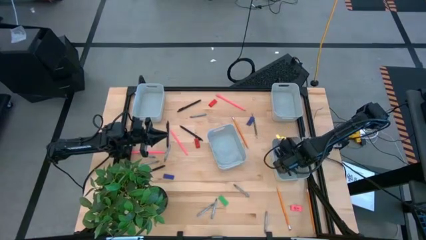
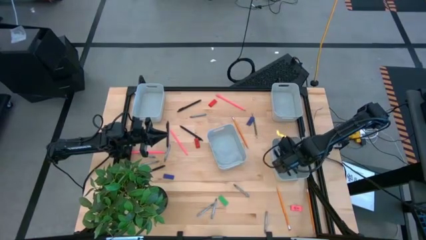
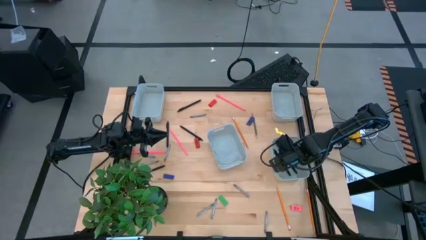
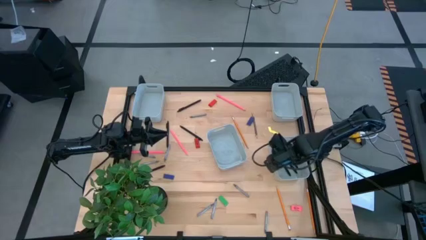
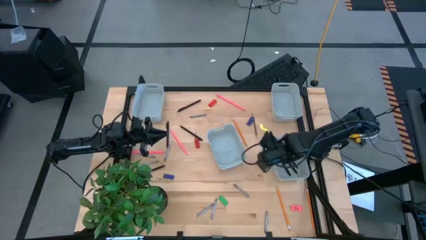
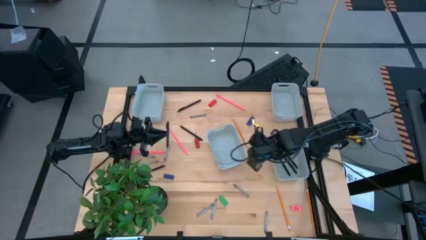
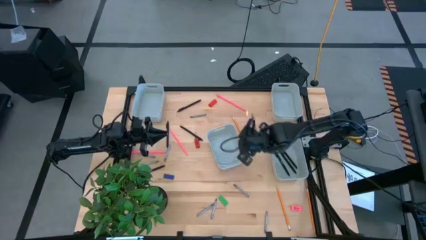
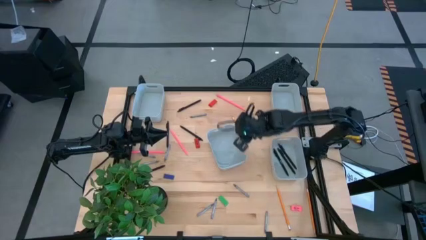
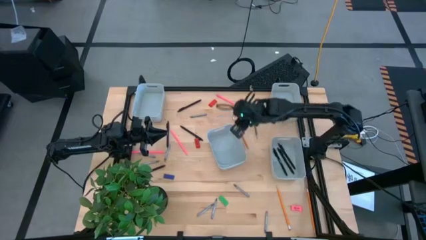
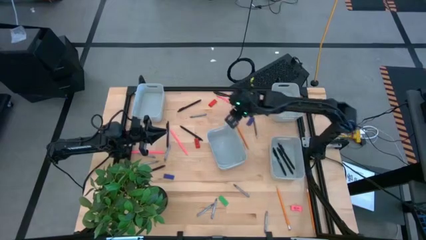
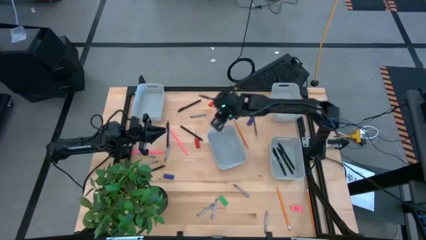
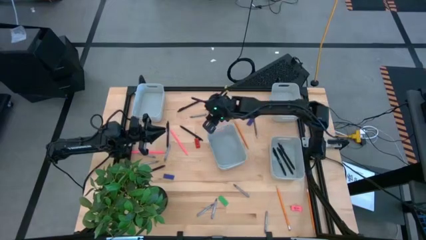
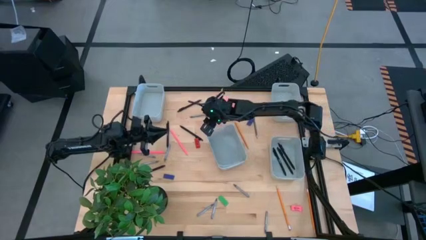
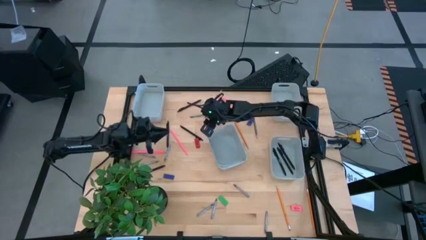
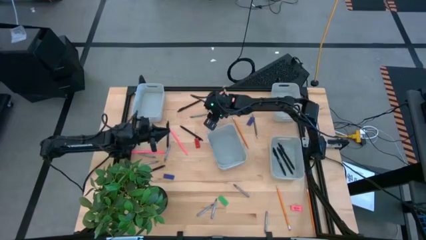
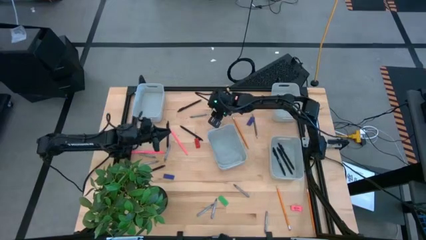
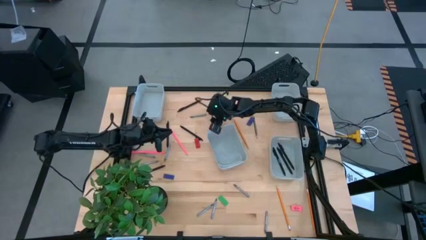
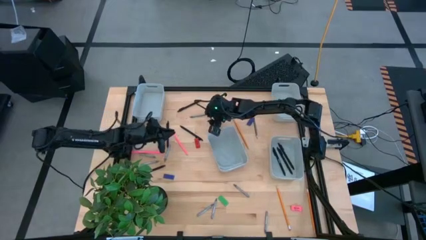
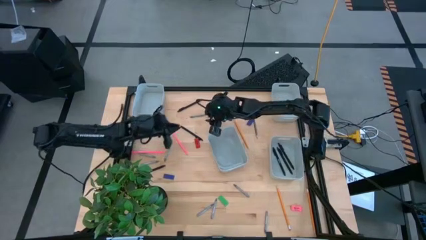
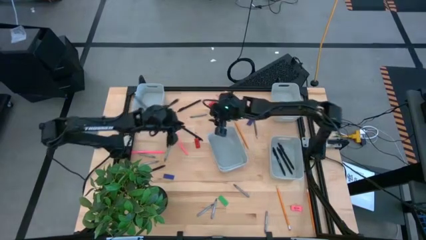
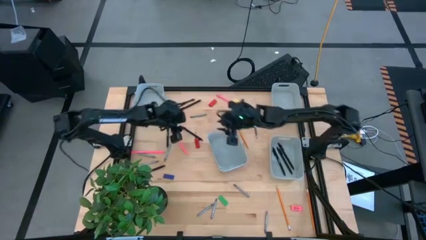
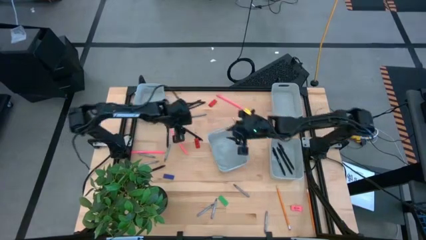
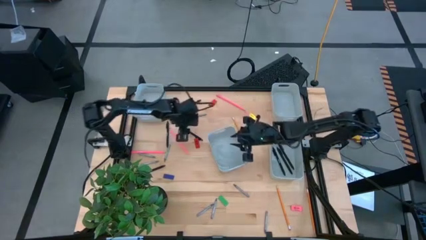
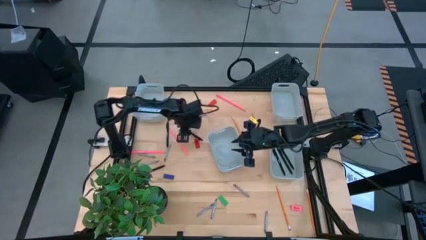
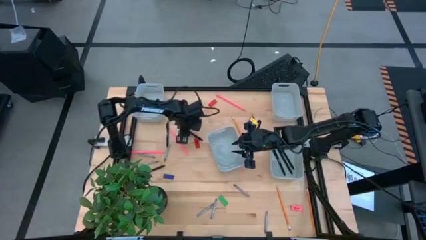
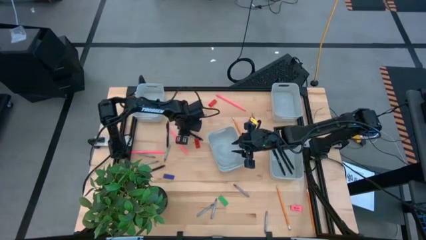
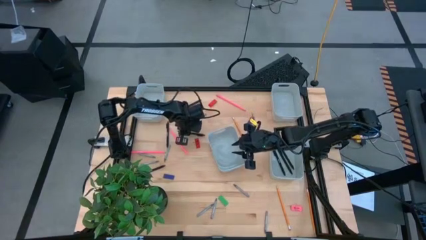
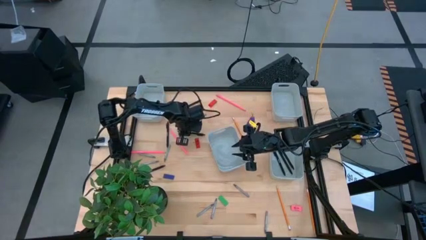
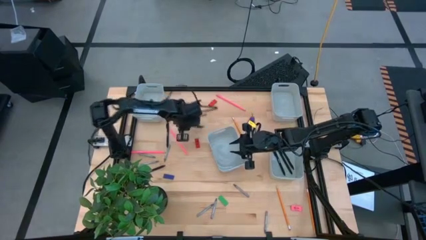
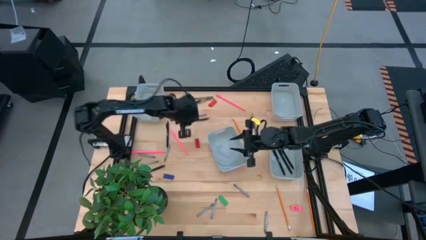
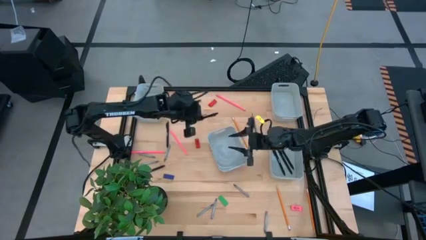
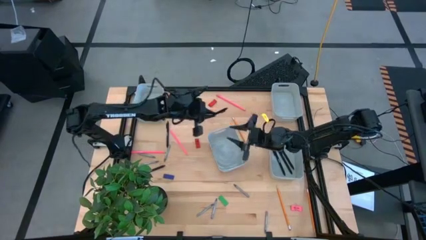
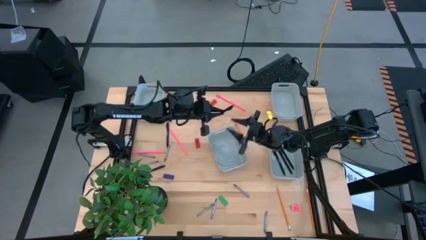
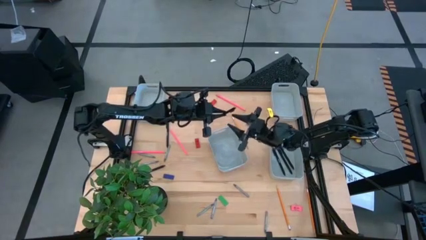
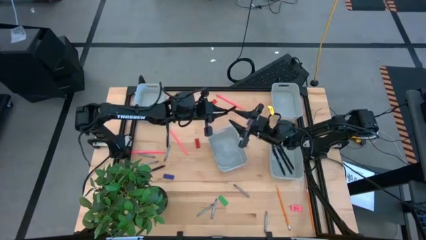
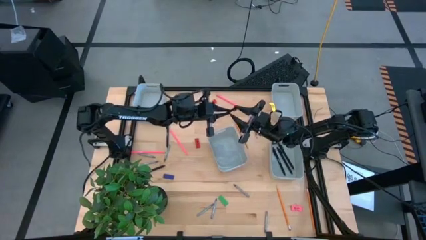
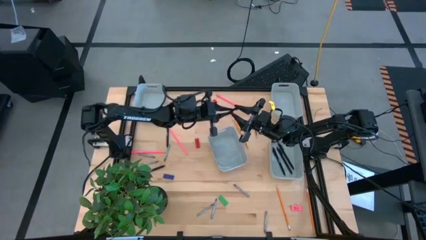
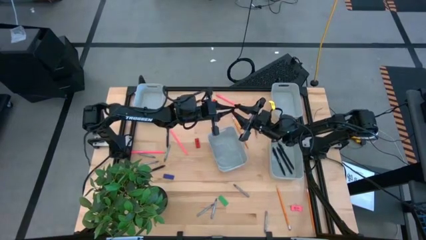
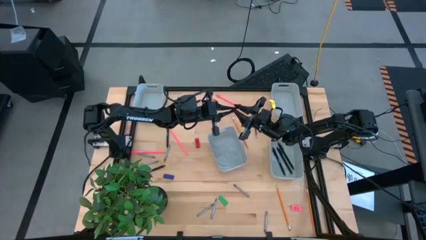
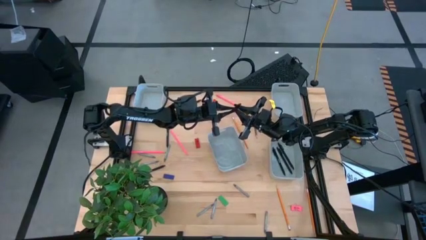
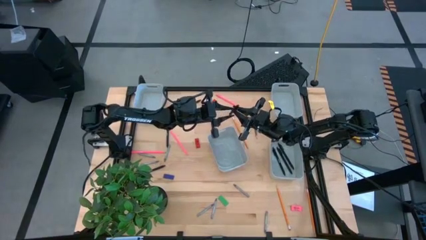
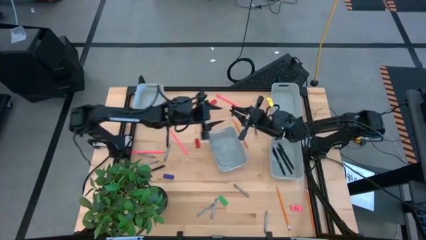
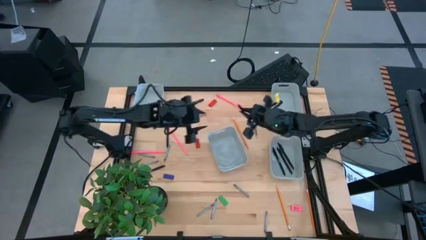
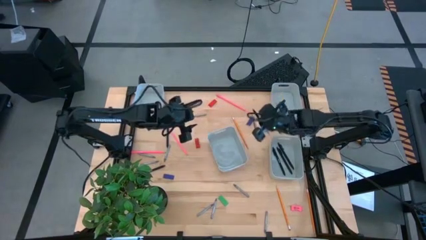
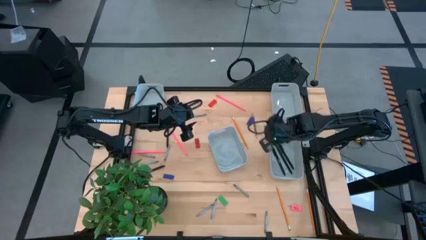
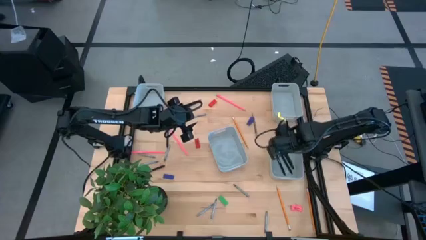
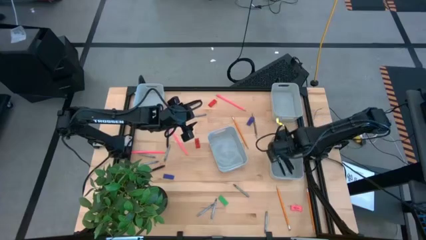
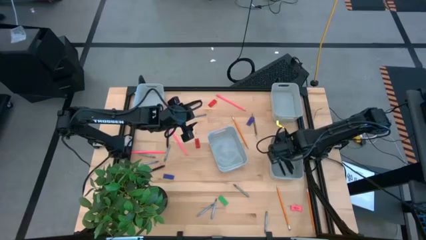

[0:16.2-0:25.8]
Task: Sort crayons/erasers/pens/pencils in bins
Put the black pen into the bottom right gray bin

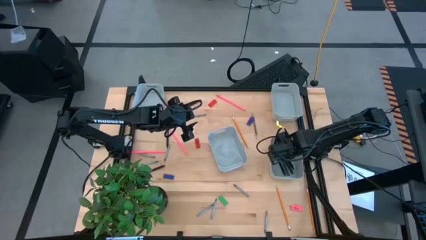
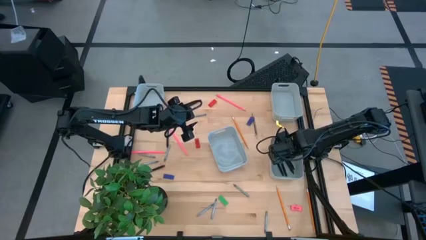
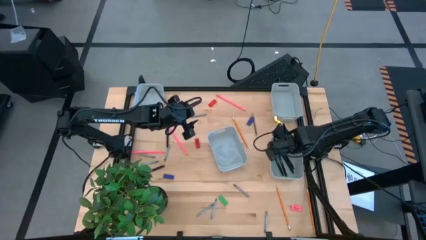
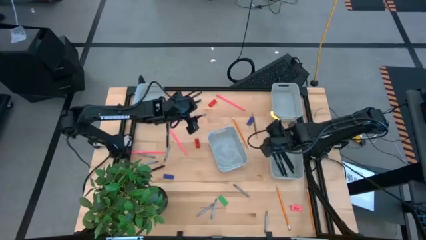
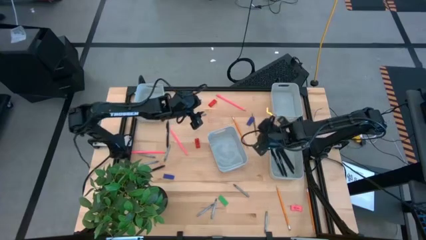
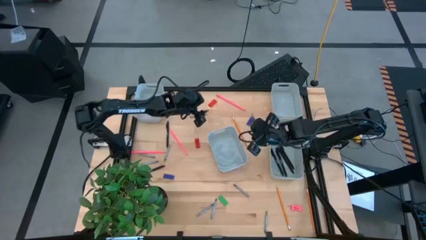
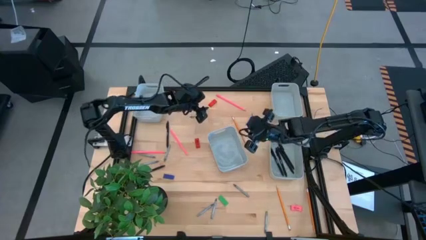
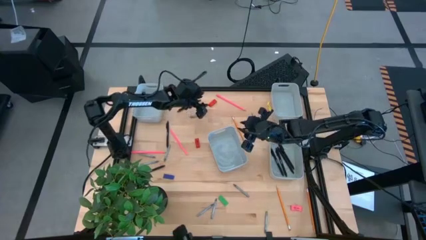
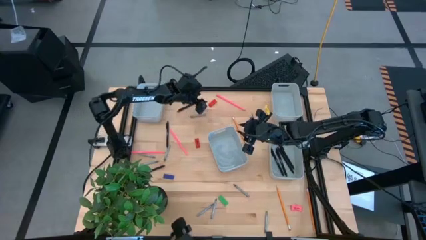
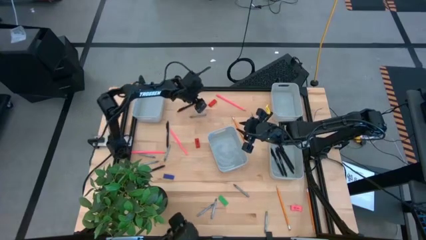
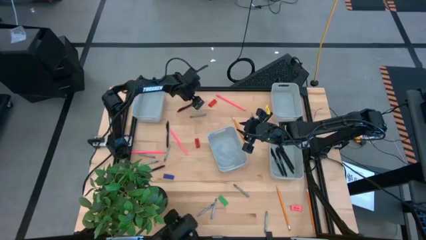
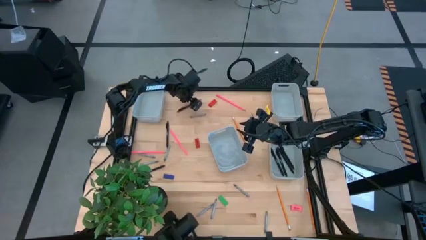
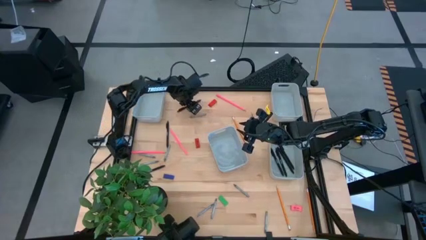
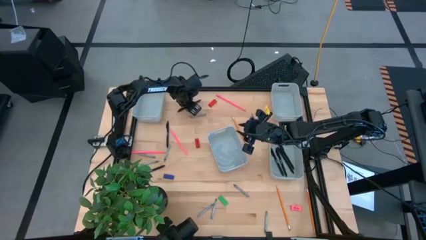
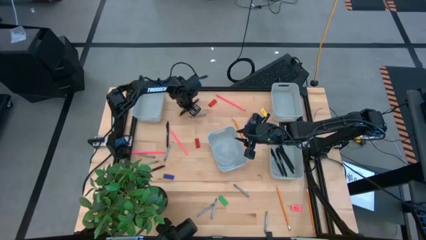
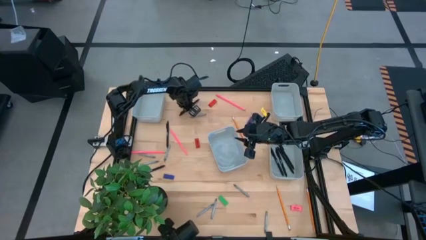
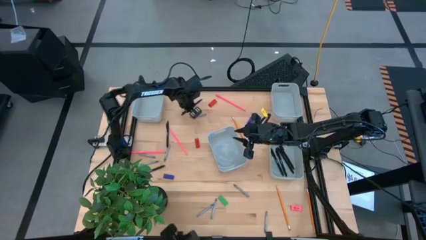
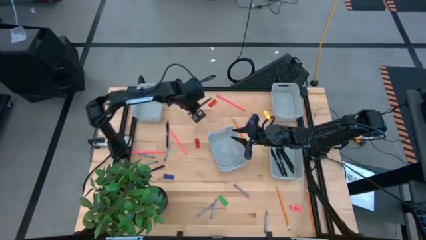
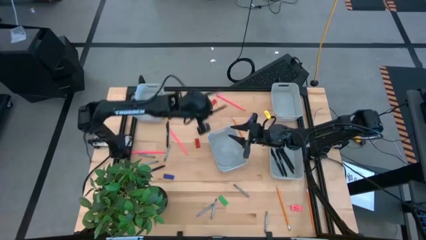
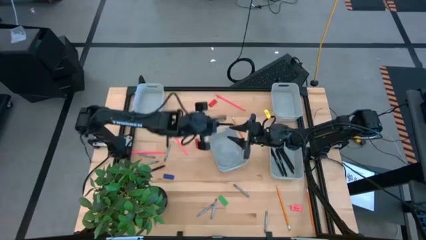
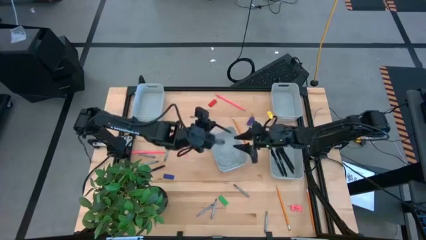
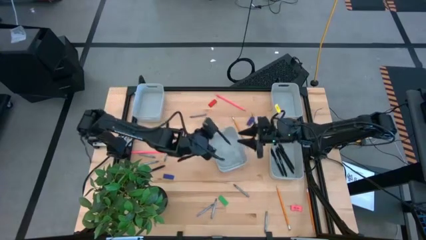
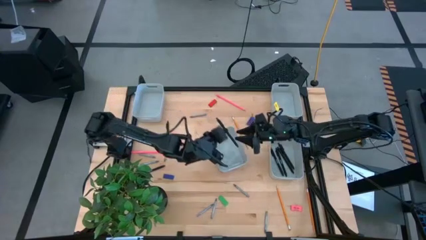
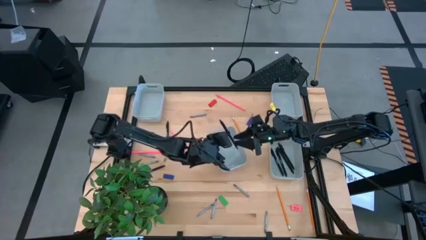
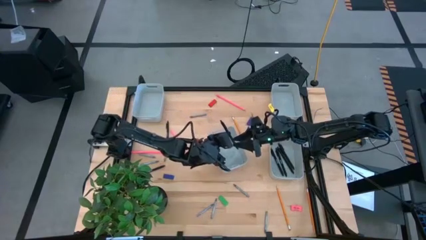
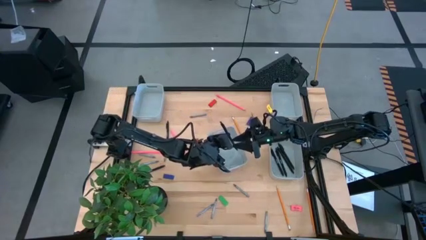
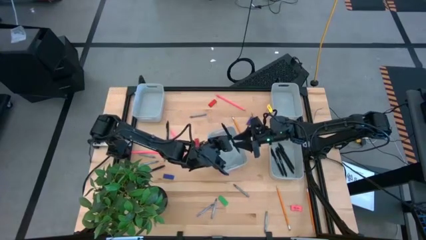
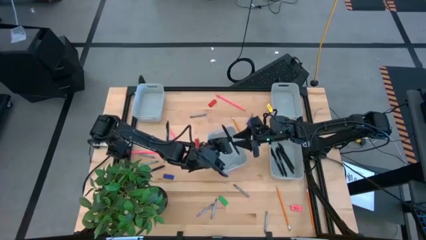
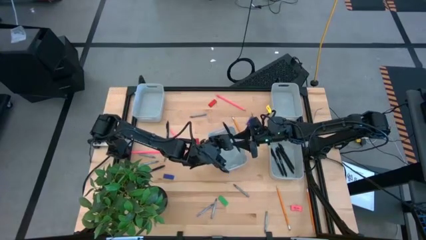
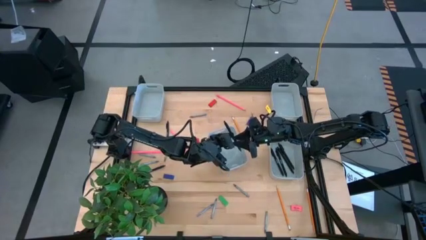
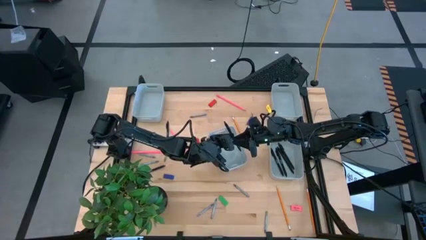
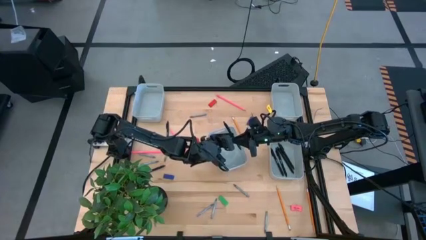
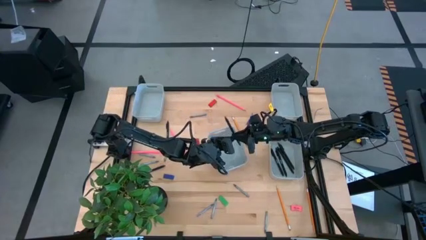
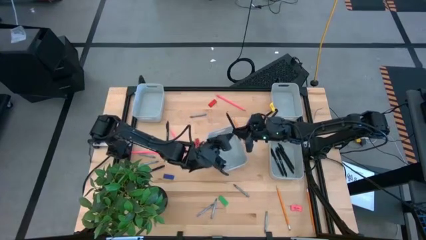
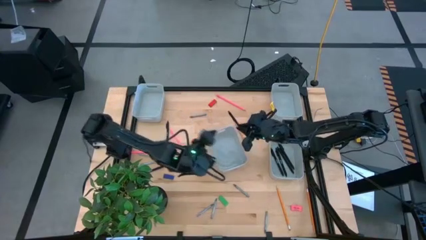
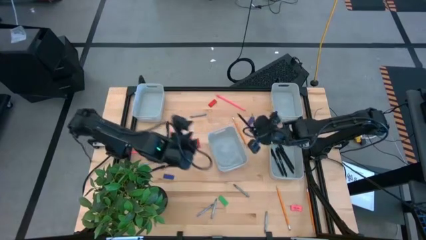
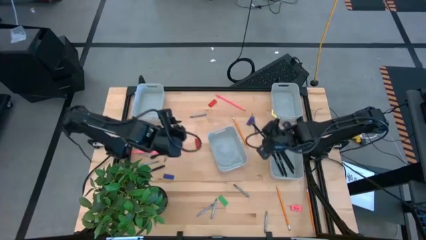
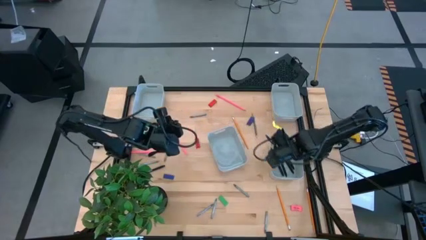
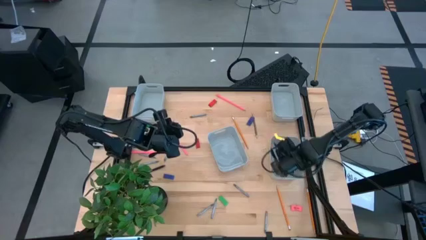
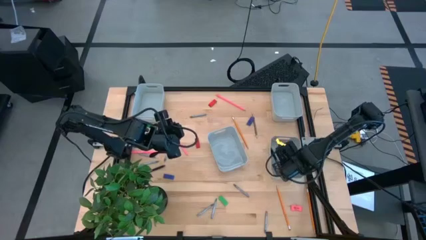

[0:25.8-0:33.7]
Put the black pen into the bottom right gray bin
